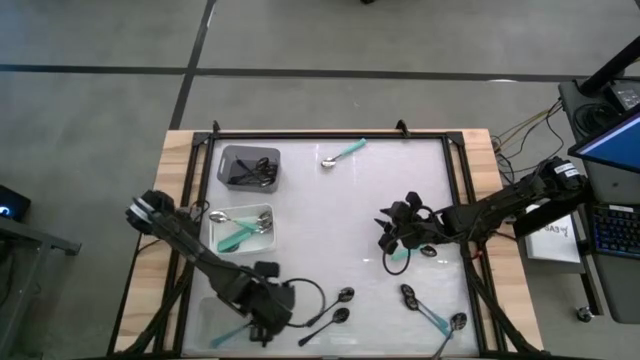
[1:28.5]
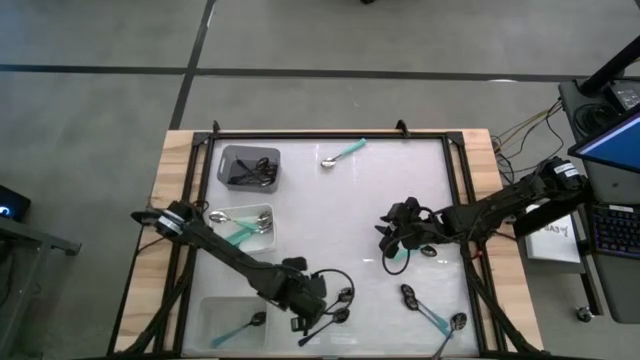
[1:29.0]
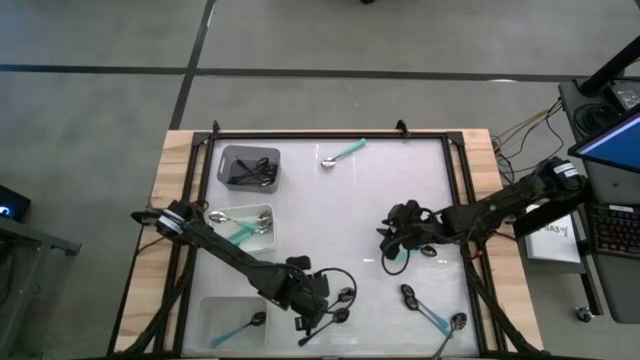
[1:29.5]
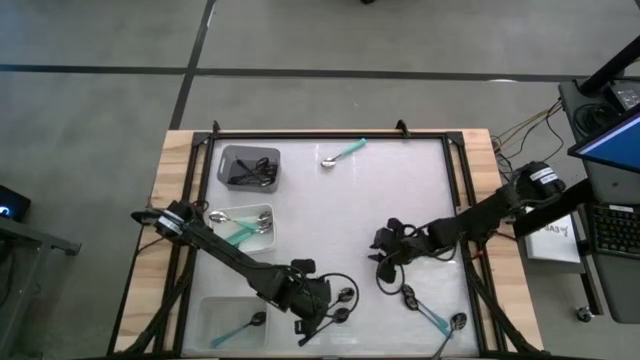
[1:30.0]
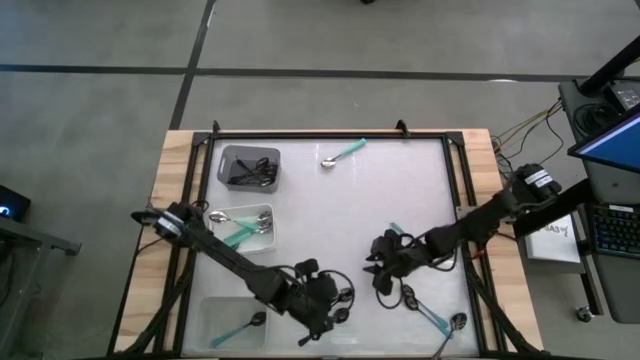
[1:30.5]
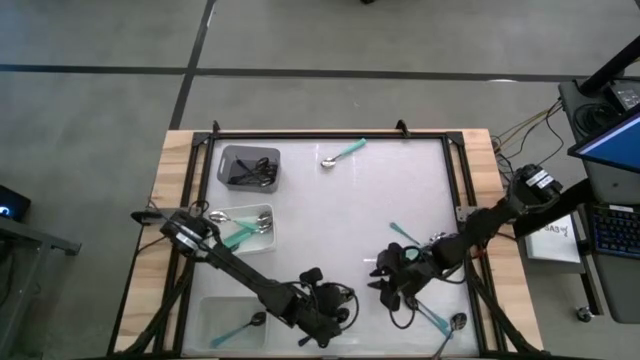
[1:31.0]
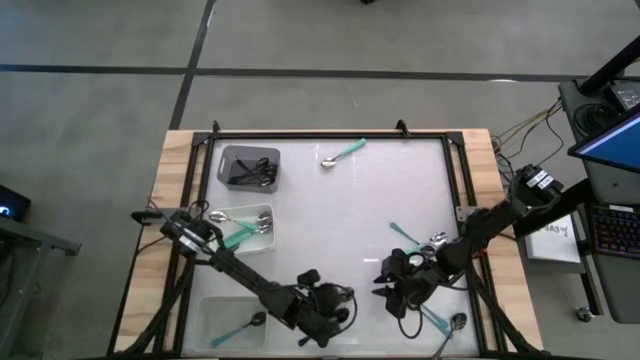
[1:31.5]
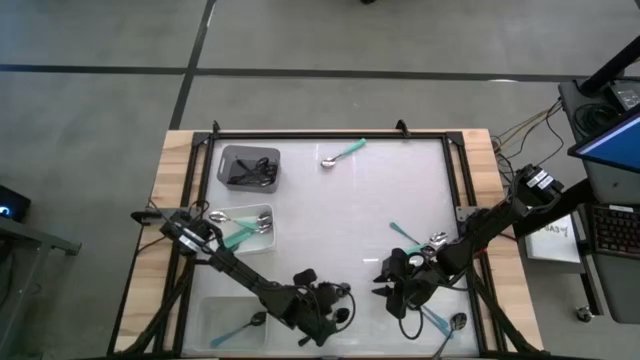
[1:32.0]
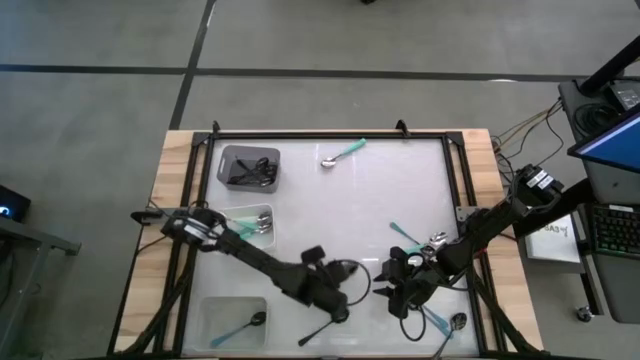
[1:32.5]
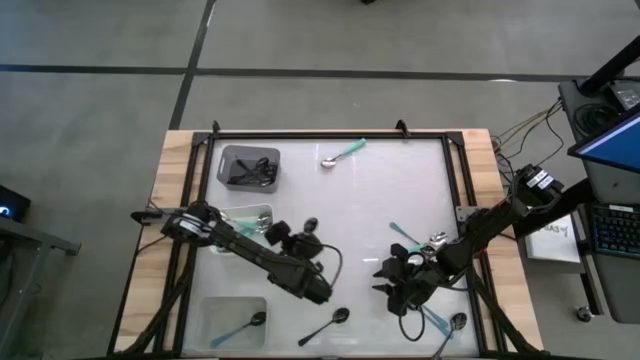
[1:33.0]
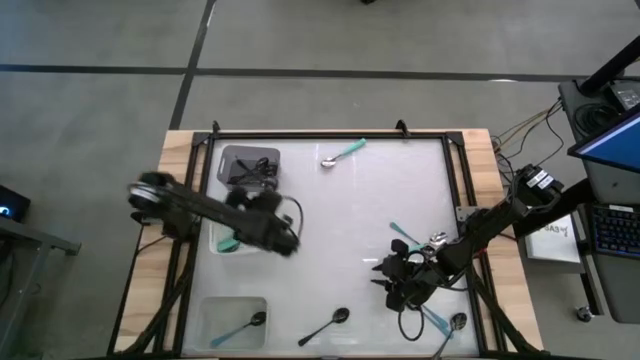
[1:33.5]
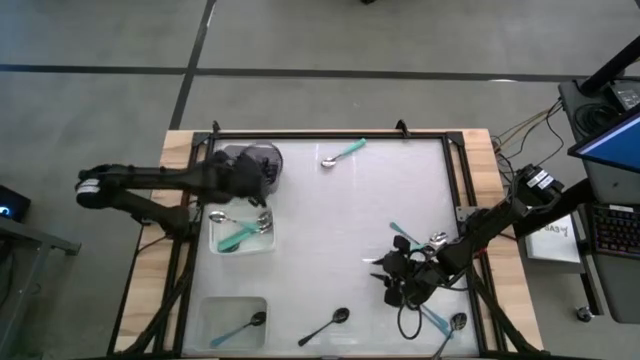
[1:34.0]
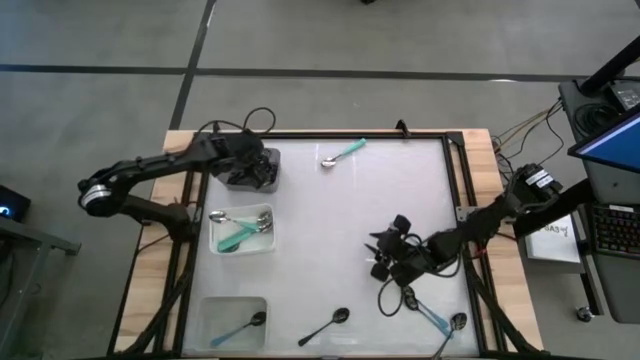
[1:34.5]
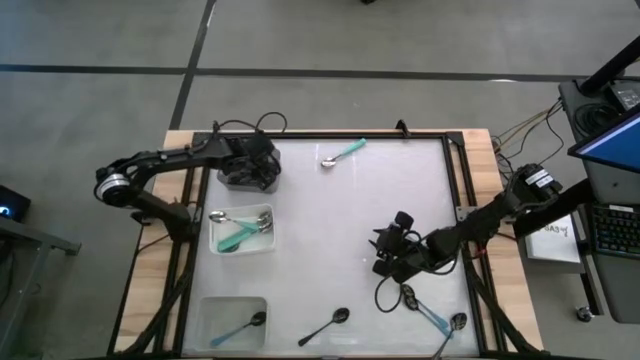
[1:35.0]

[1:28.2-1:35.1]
Task: Sort silverware by color (type)
Put the black spoon into the black bin

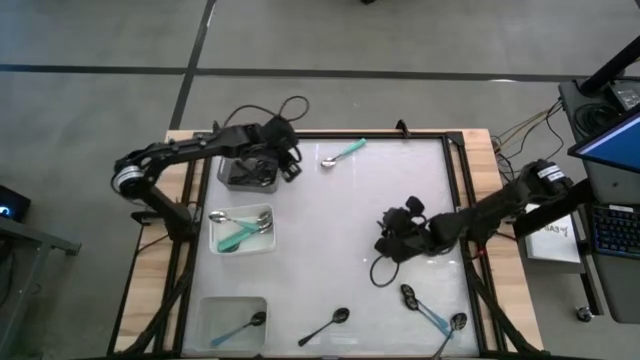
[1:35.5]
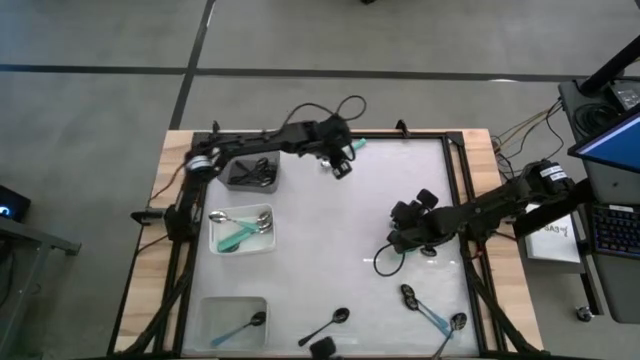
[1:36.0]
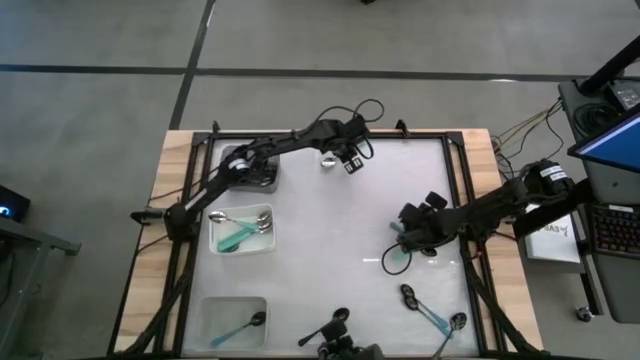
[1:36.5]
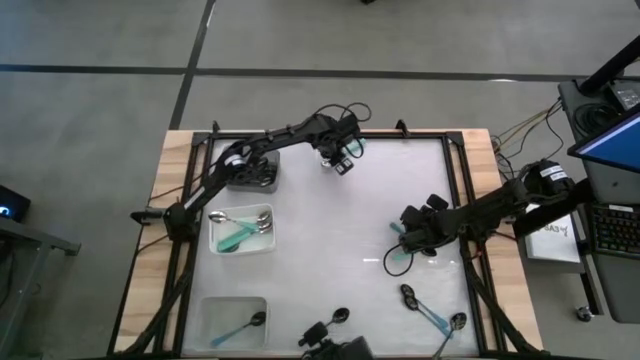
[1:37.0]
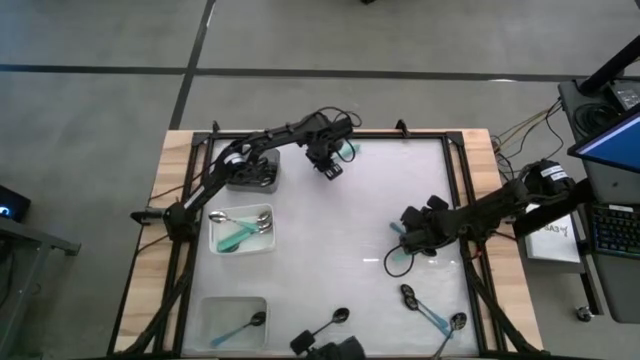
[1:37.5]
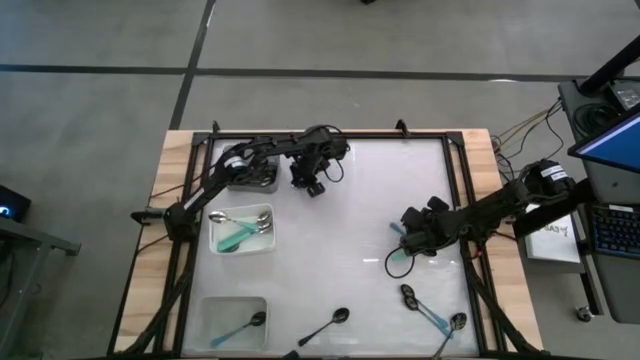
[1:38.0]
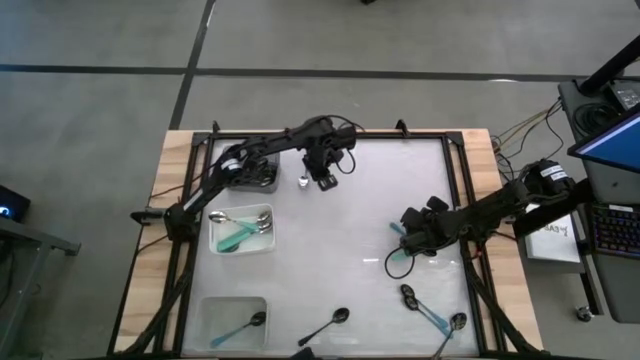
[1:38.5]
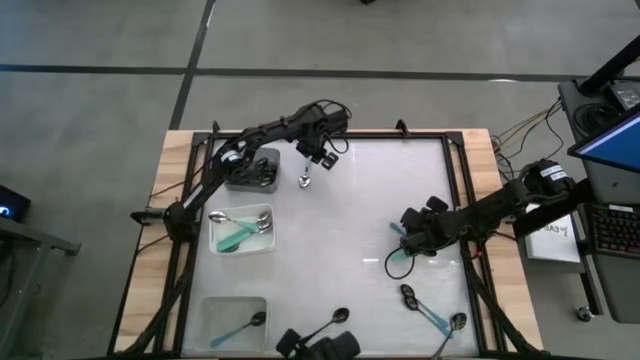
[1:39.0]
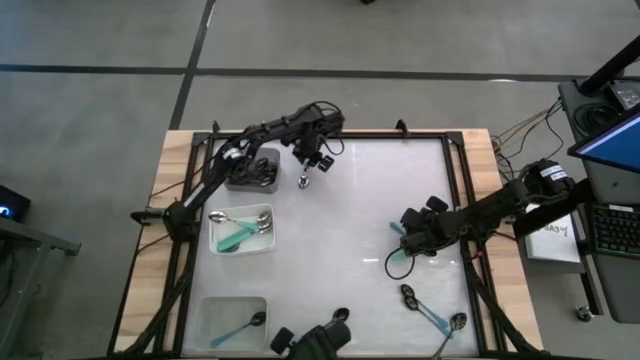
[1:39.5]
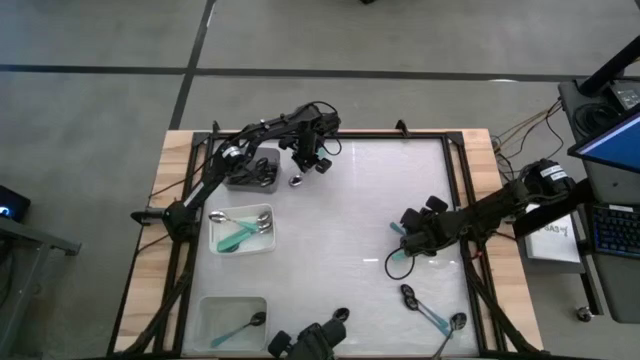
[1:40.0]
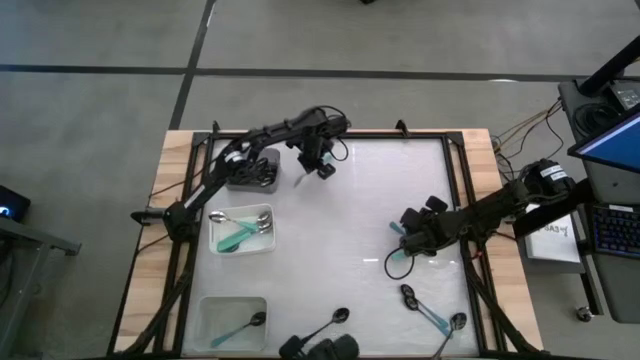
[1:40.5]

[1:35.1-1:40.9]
Put the light green spoon into the white bin

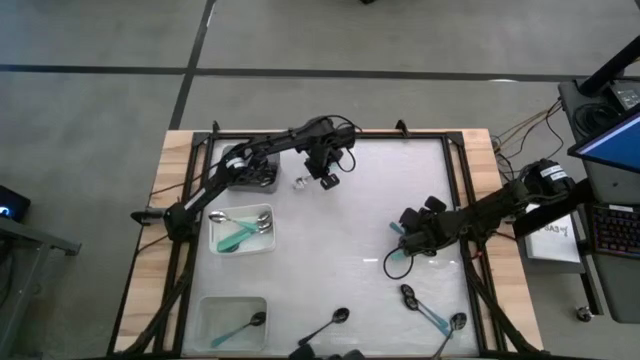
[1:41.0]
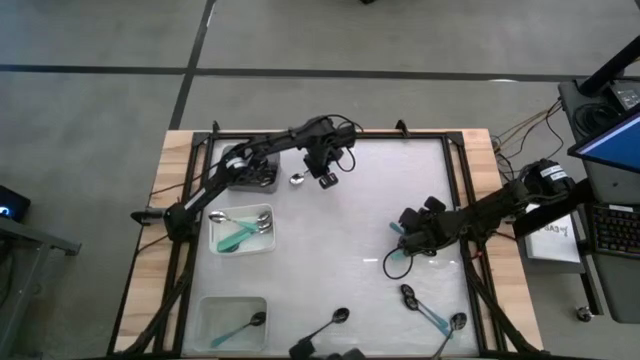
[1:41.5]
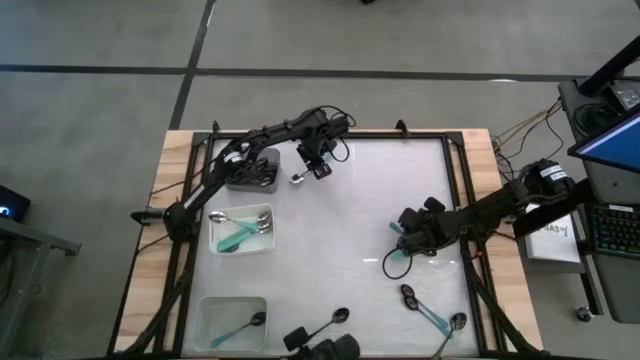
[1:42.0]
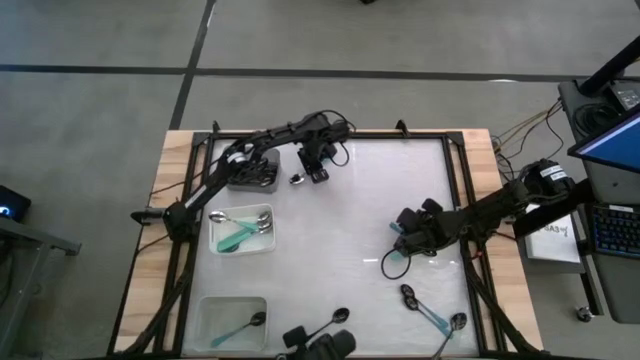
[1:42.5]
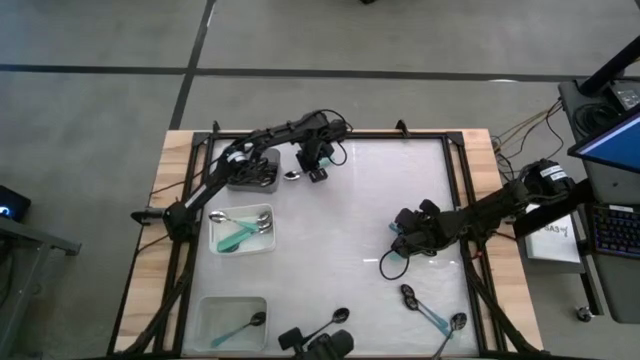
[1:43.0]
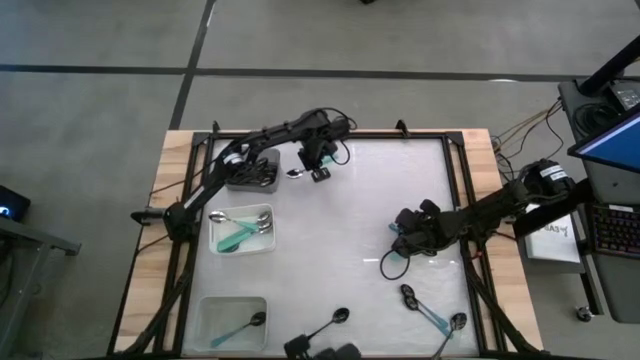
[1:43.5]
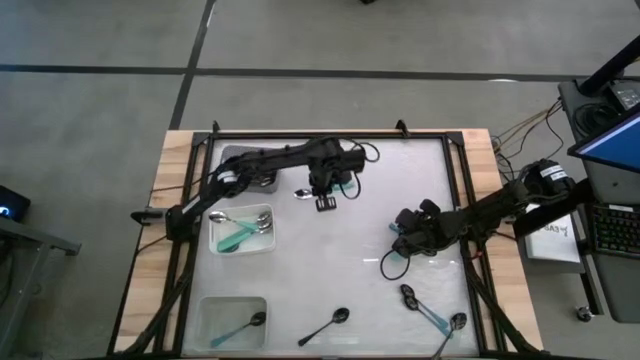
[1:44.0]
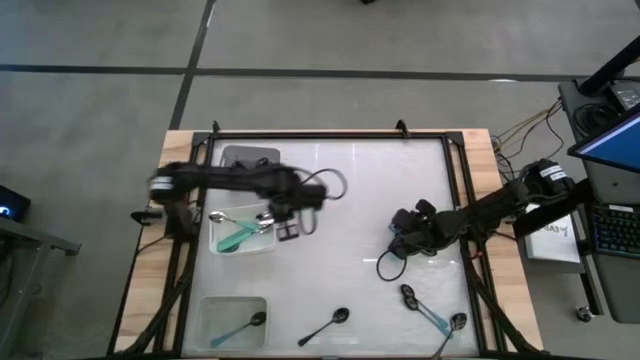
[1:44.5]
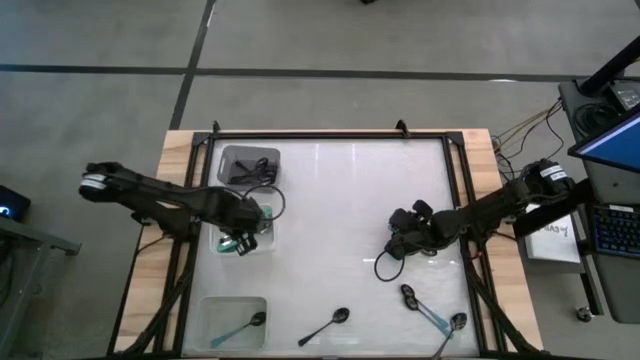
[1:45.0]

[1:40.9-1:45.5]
Put the light green spoon into the white bin

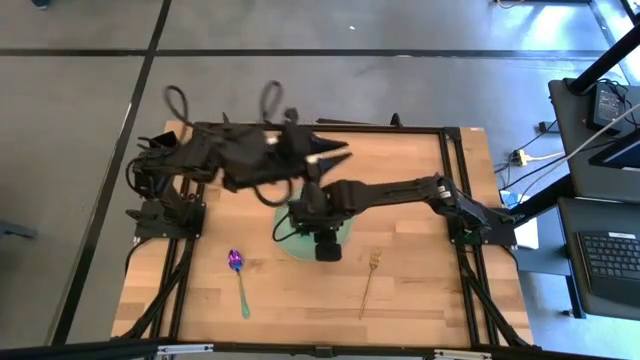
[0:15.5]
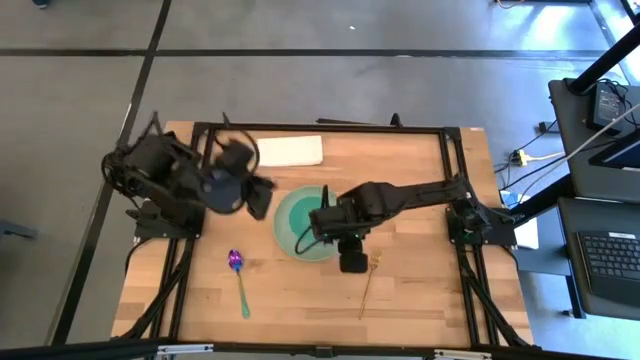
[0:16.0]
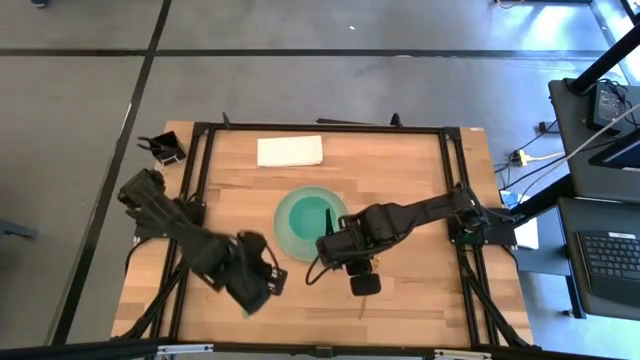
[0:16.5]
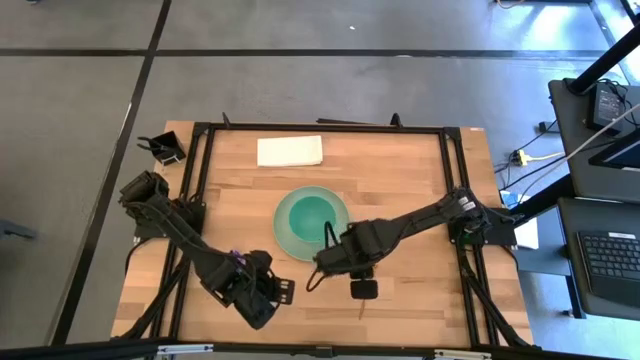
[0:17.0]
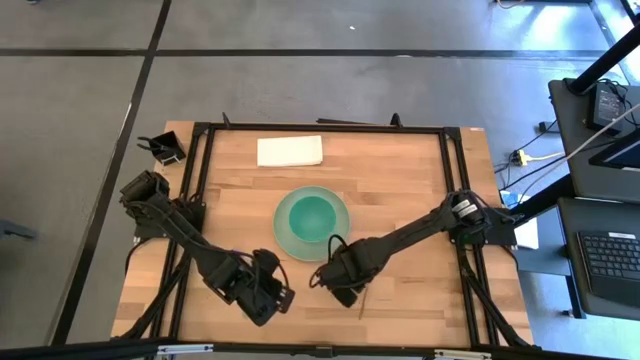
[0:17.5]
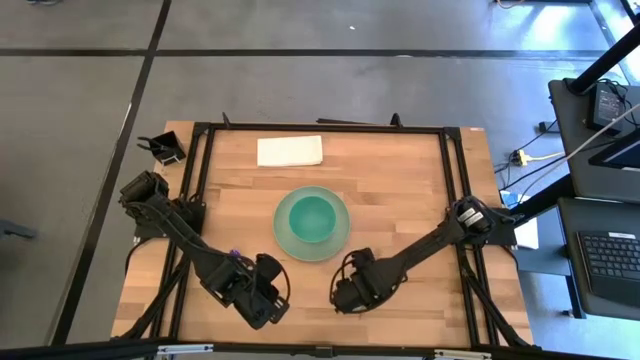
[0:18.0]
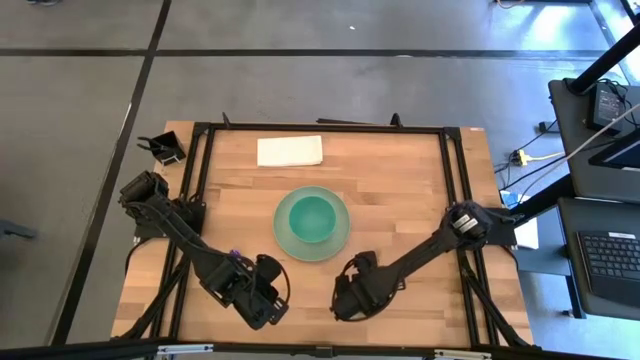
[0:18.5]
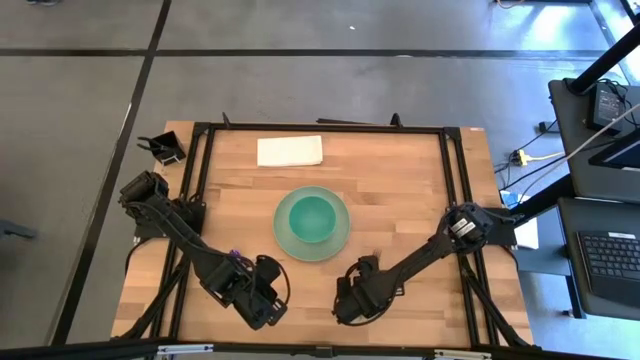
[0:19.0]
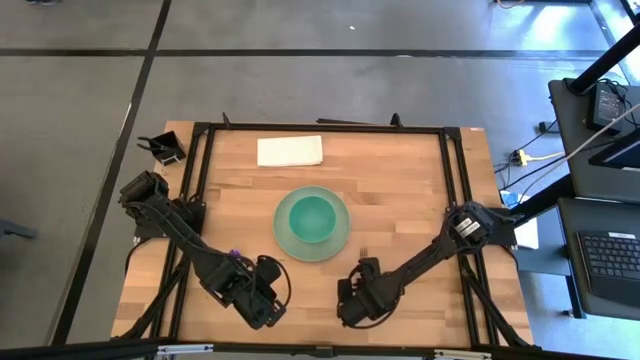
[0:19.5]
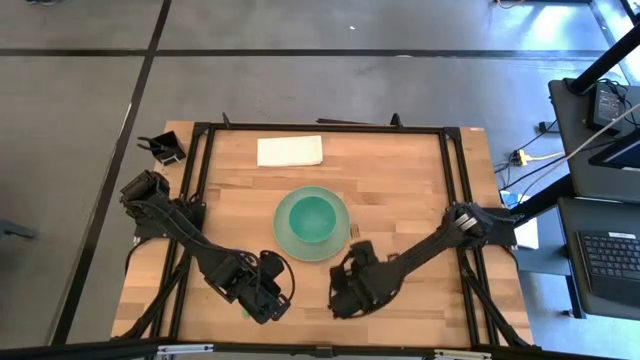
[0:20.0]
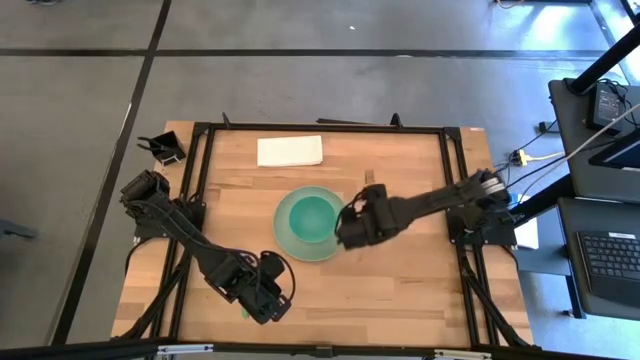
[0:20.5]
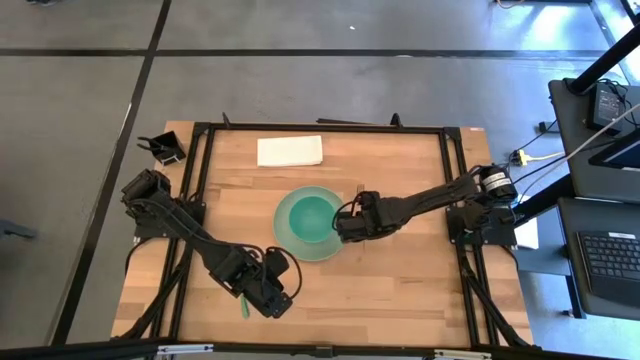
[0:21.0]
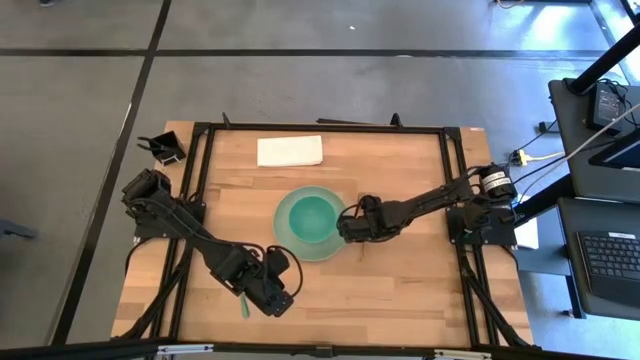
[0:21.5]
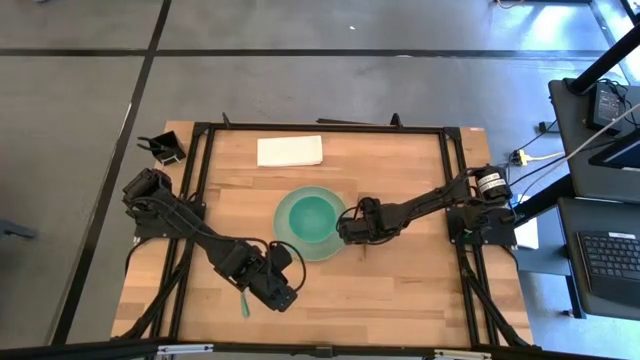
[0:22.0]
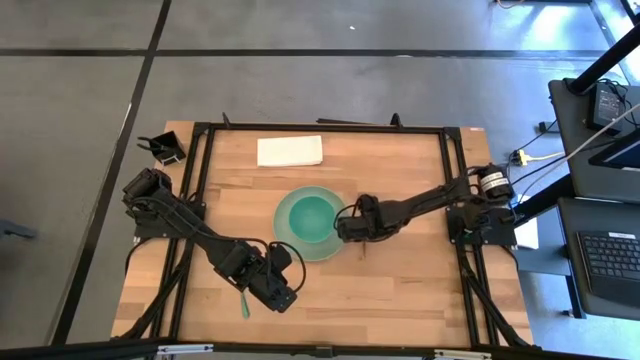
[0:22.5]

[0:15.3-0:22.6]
Task: Set table place
Move the fork from the bottom right of the table to the right side of the plate
